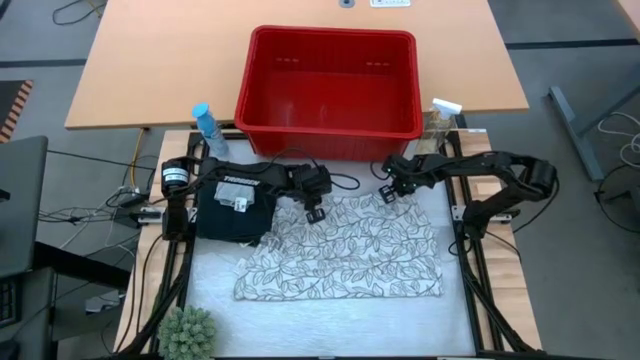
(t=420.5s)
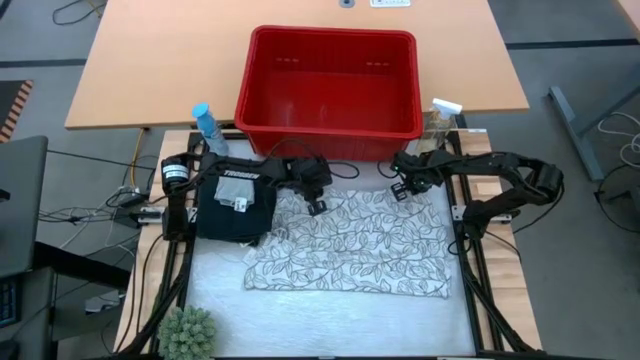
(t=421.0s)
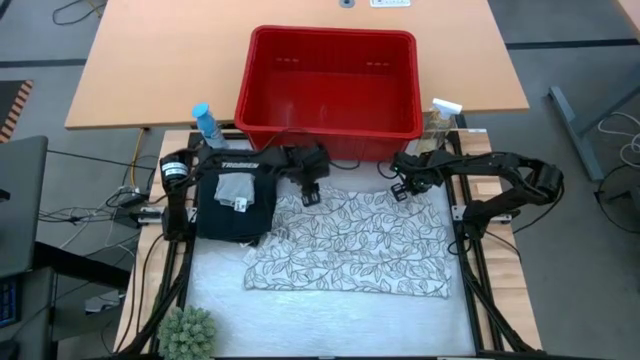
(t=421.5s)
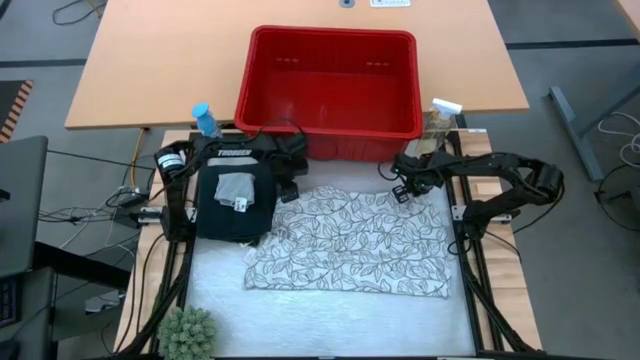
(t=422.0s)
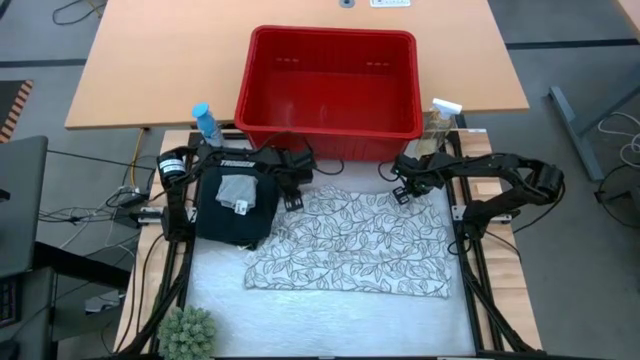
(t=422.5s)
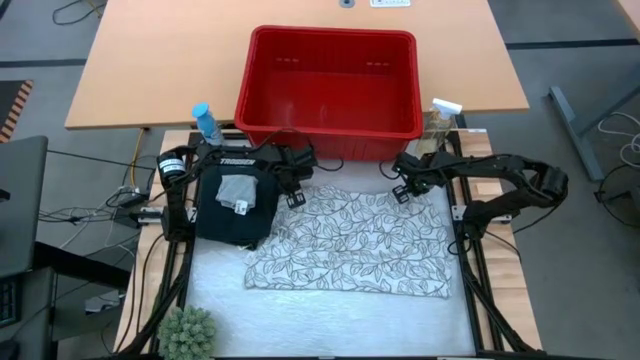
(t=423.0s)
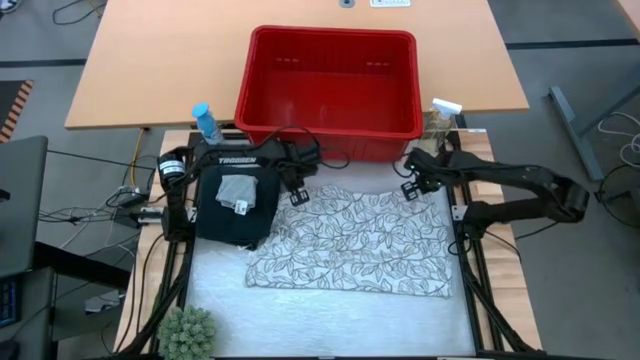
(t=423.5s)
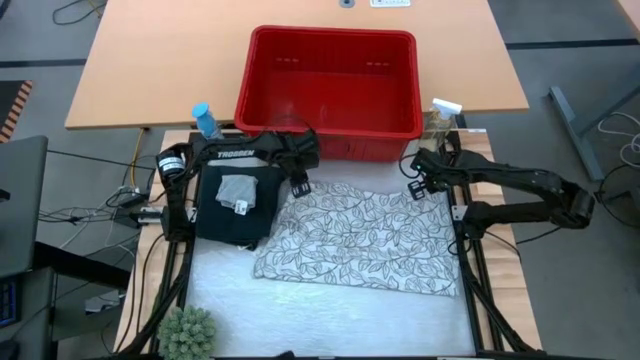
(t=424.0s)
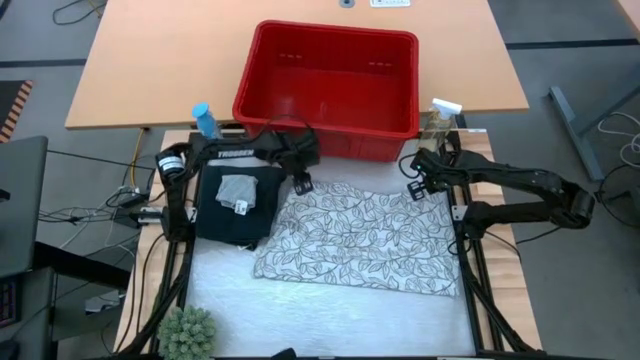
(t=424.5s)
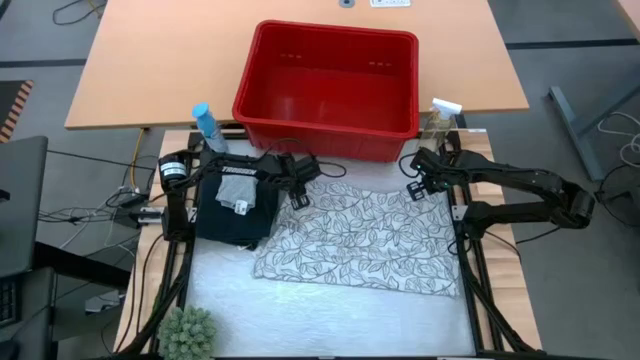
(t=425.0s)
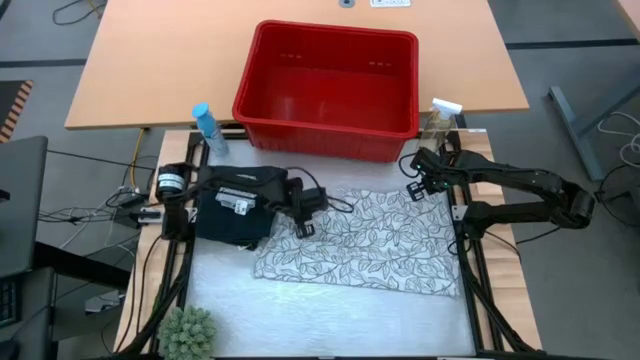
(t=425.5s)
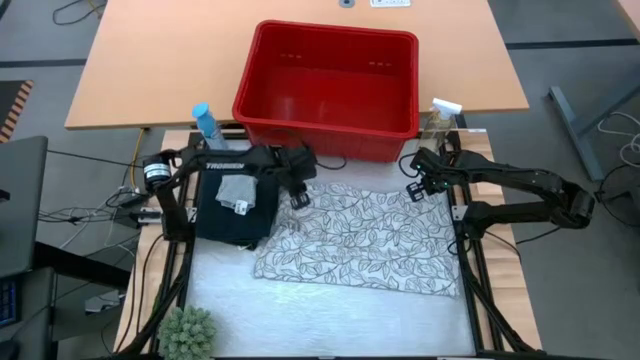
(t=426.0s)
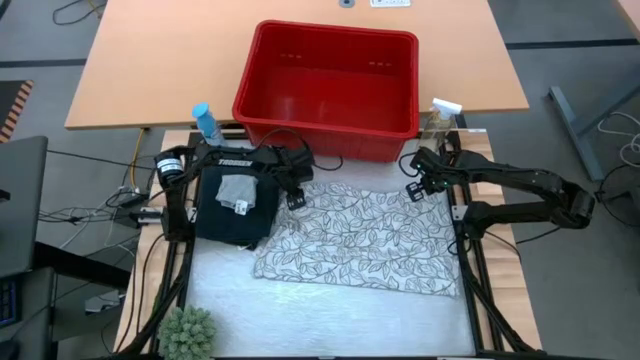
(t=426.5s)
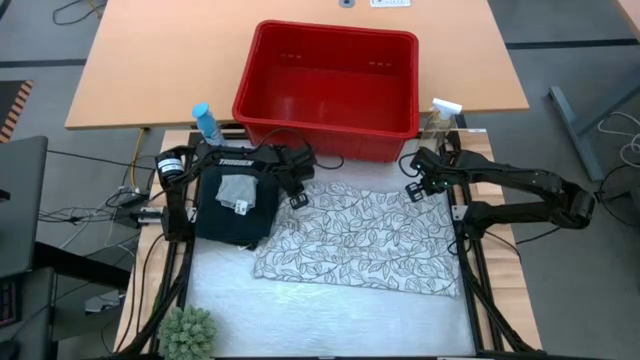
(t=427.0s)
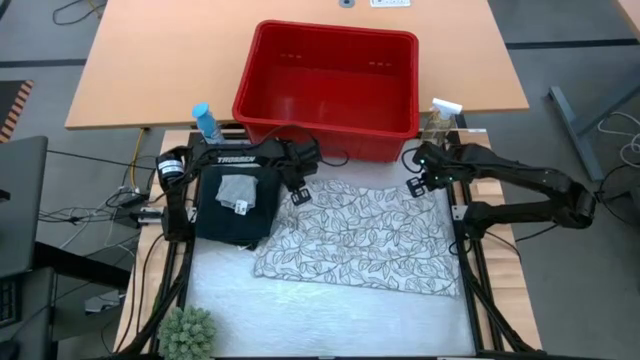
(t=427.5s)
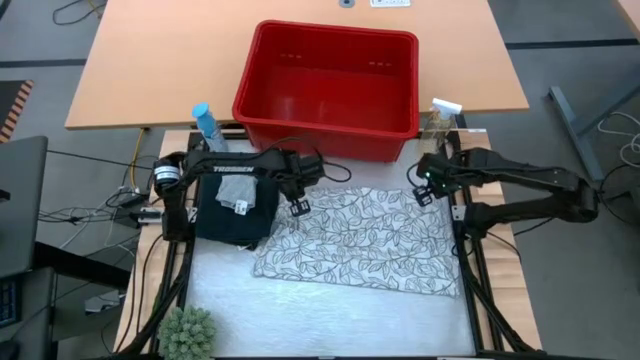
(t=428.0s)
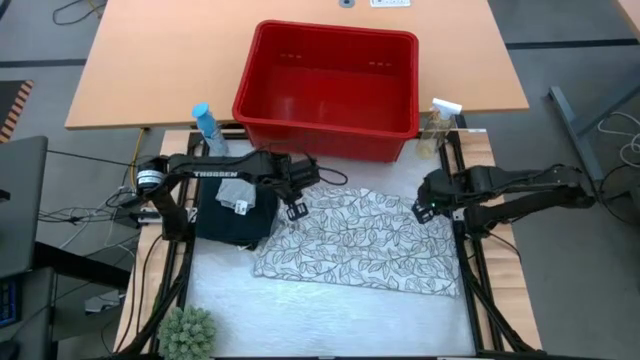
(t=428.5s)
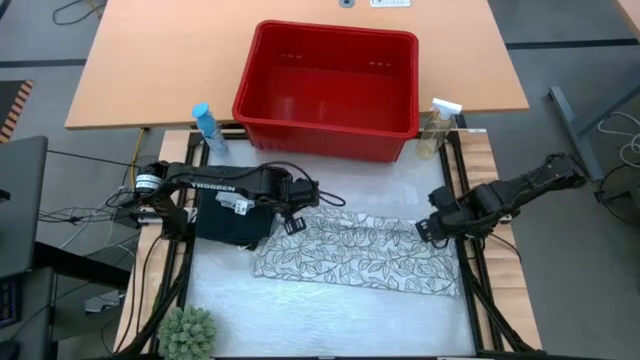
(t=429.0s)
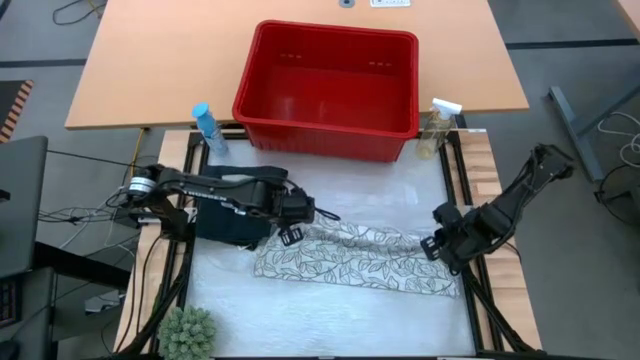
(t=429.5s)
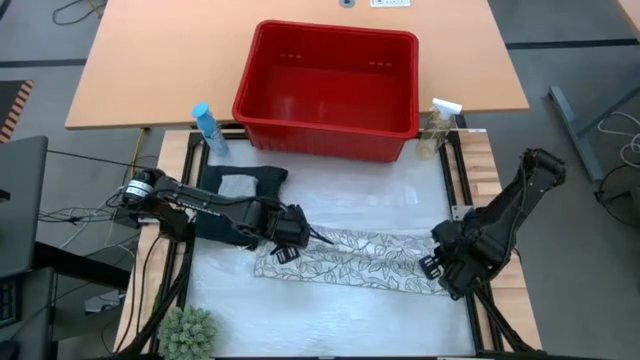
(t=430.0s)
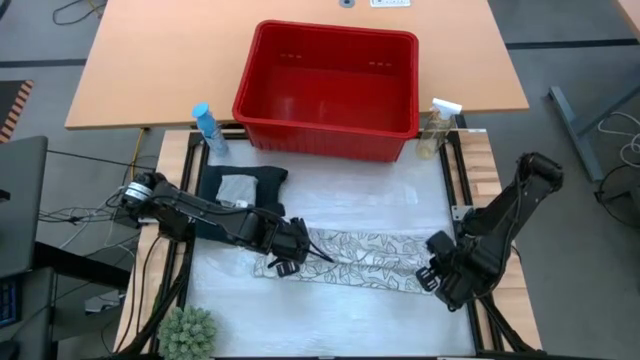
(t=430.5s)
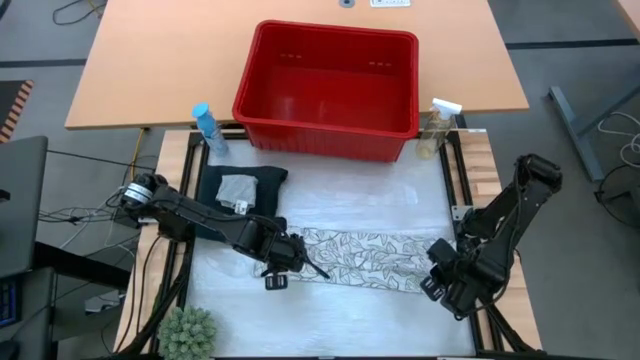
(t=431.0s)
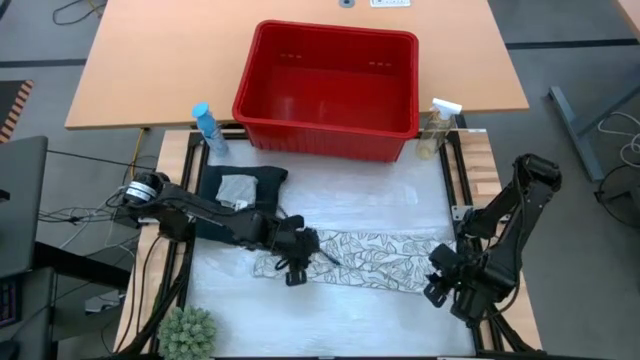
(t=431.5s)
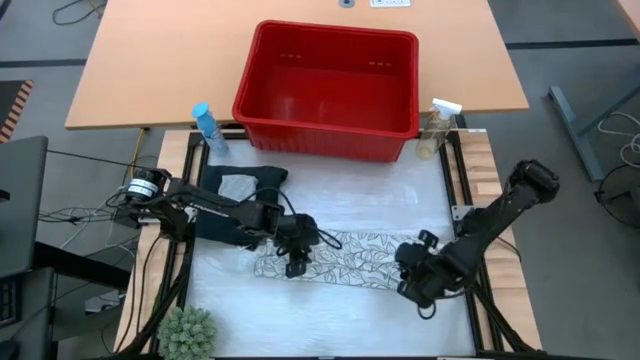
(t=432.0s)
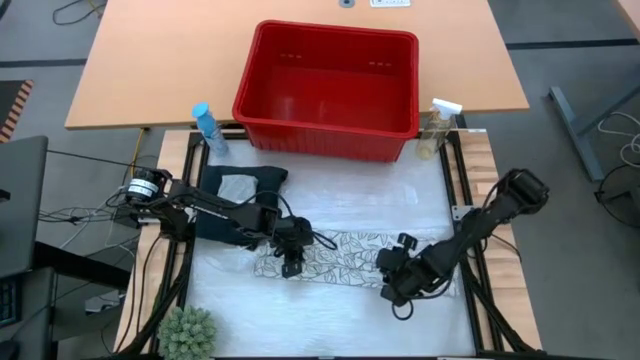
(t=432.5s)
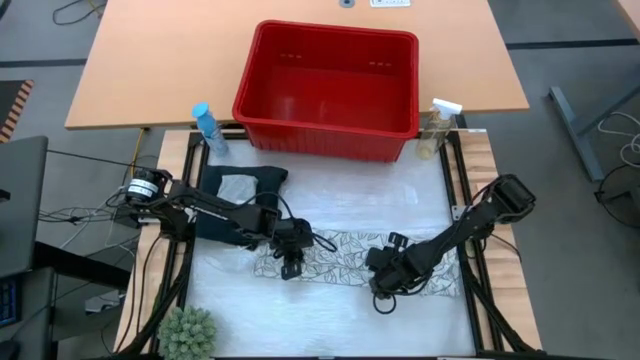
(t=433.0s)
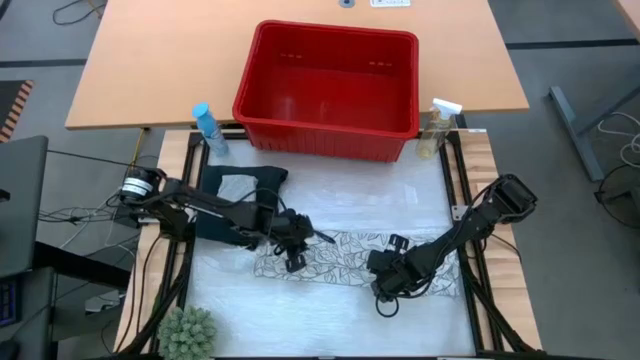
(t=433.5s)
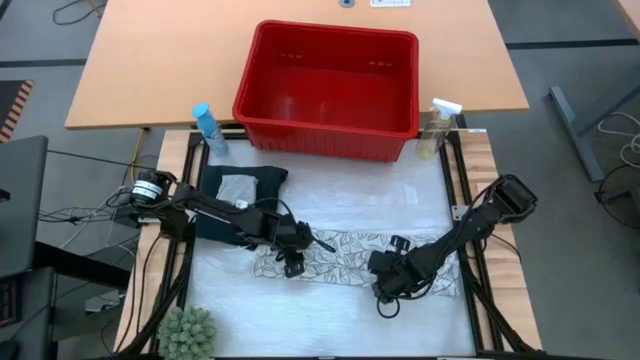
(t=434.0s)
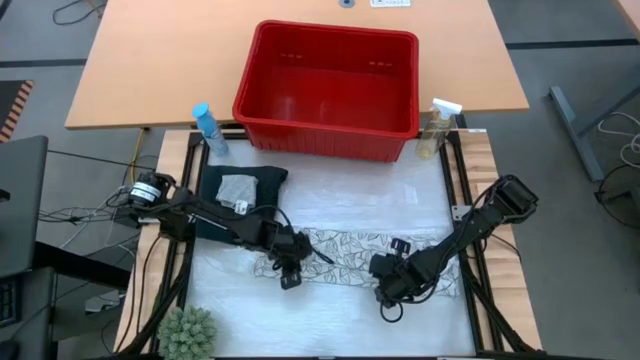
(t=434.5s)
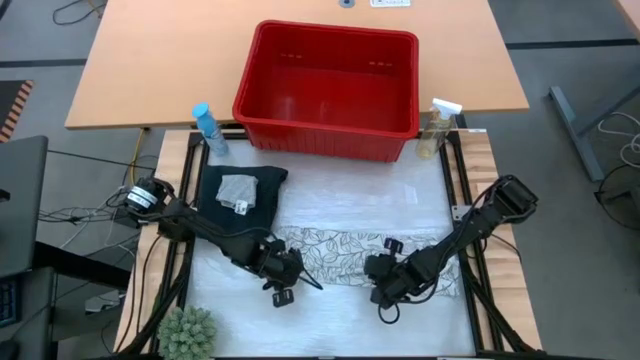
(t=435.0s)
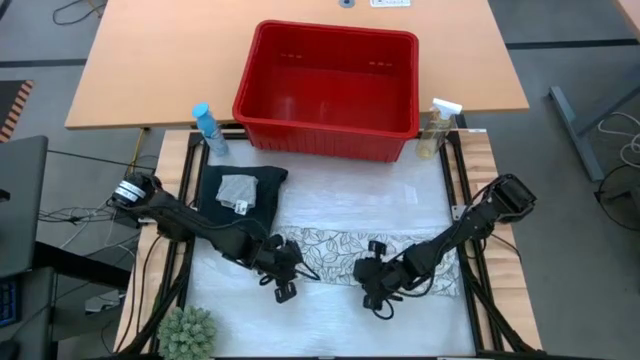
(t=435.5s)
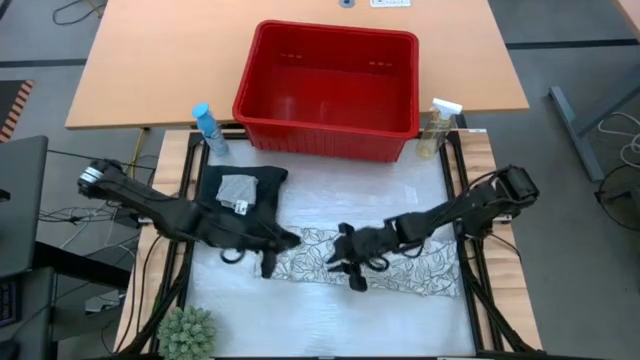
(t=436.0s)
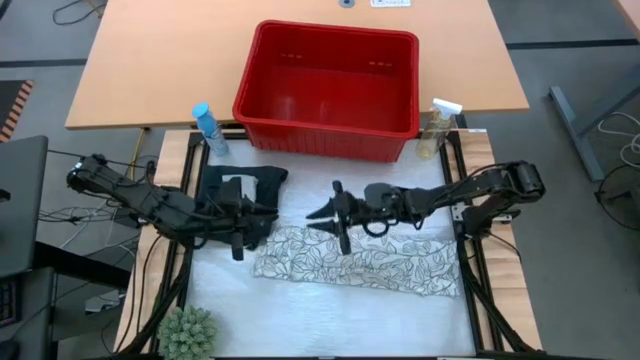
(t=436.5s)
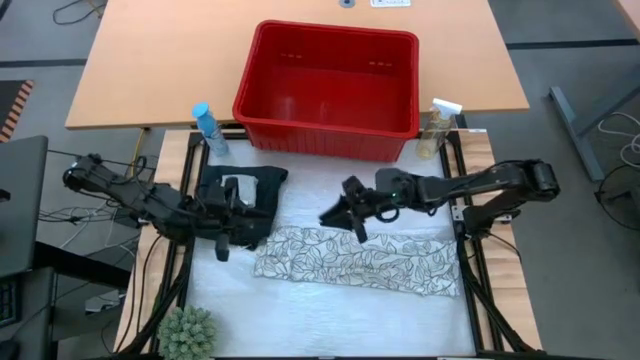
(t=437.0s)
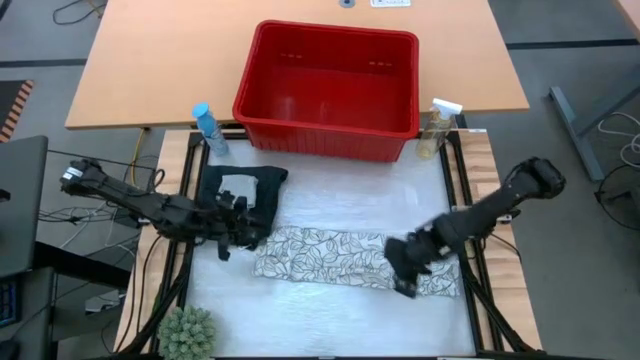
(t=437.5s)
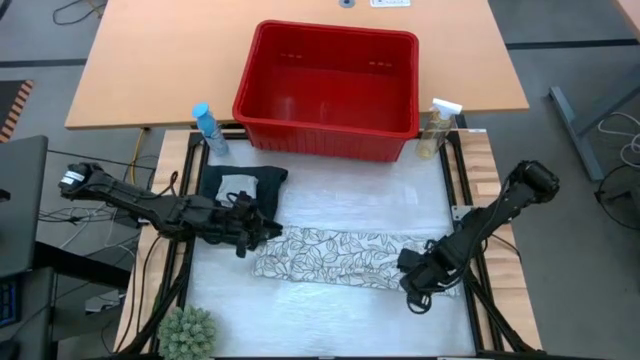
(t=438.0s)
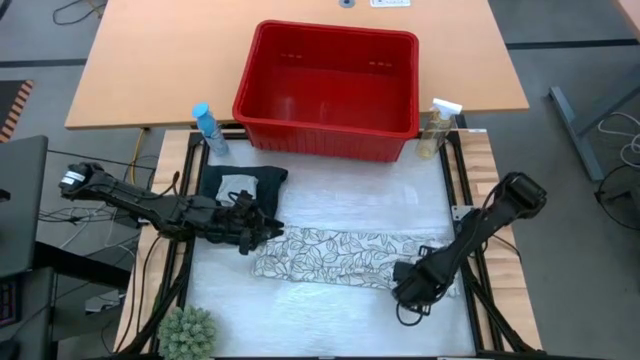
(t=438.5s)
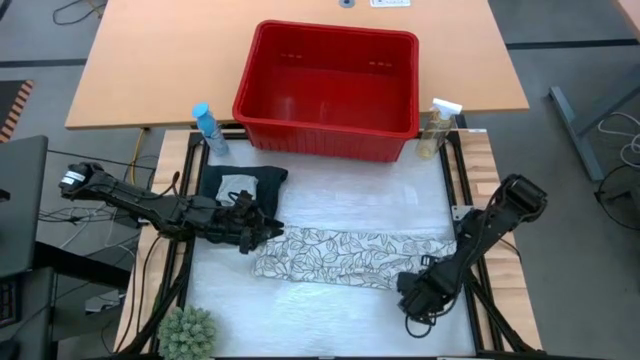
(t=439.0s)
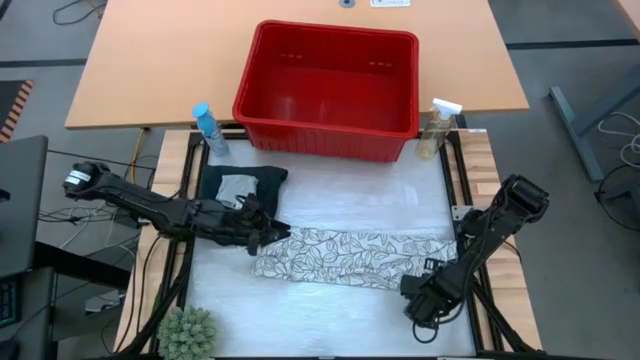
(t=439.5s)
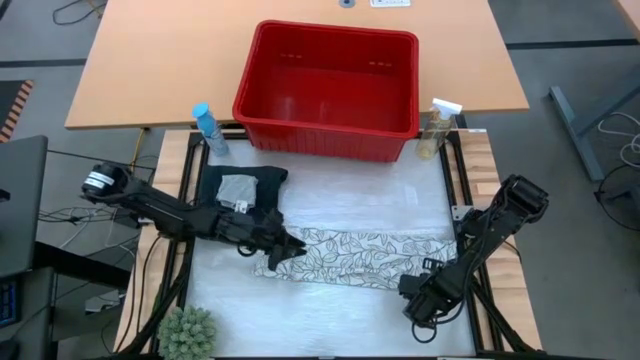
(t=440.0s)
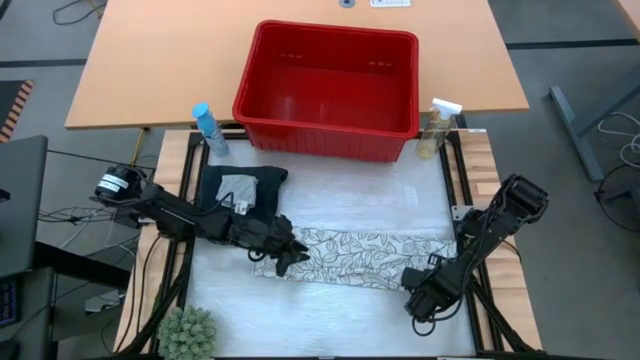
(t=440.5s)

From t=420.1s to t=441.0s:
Task: Fold Laundry from Bin
Fold the white patterned shirt
